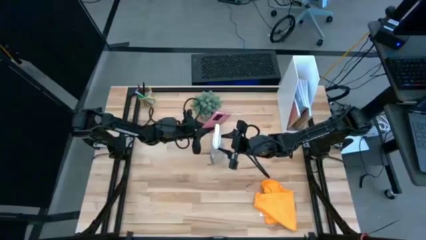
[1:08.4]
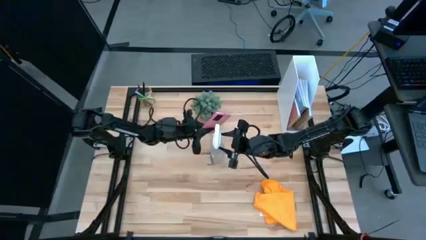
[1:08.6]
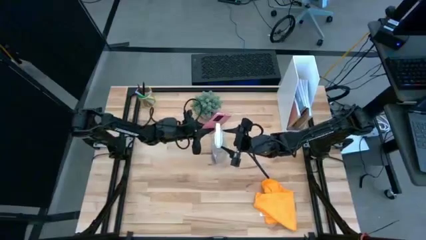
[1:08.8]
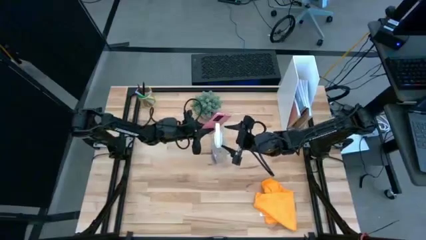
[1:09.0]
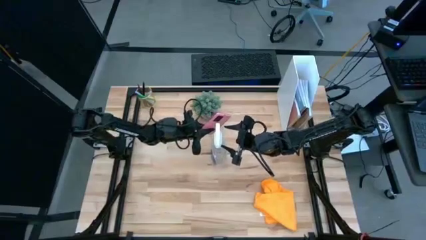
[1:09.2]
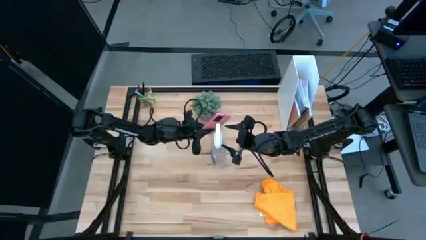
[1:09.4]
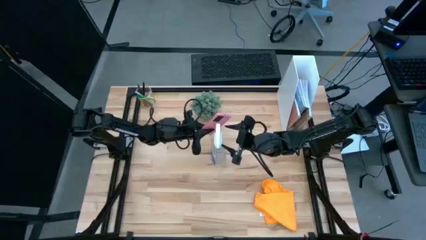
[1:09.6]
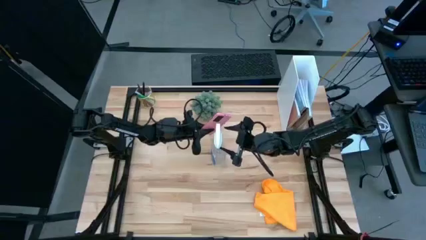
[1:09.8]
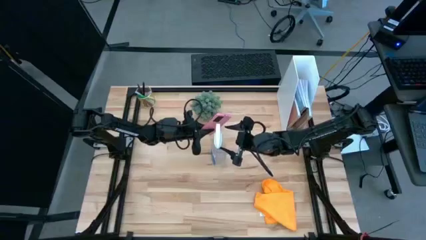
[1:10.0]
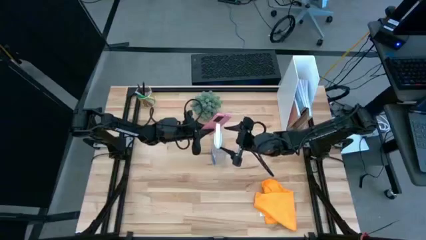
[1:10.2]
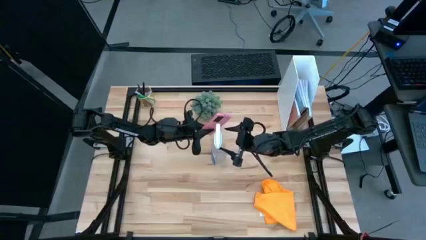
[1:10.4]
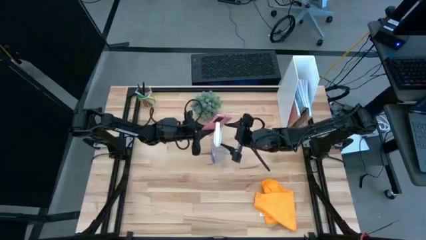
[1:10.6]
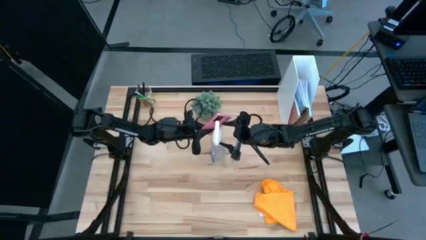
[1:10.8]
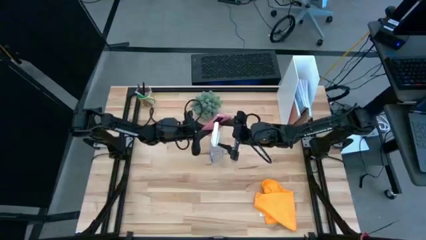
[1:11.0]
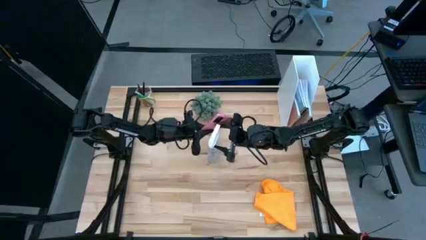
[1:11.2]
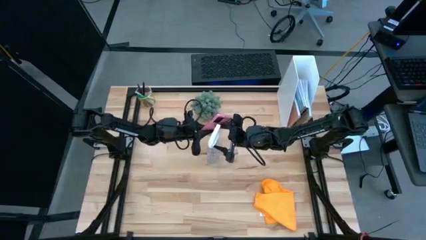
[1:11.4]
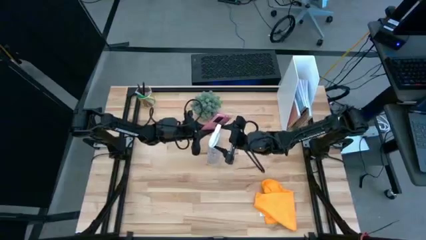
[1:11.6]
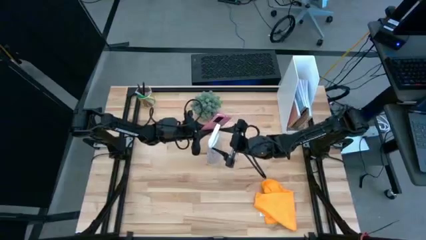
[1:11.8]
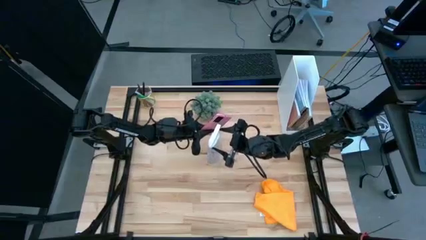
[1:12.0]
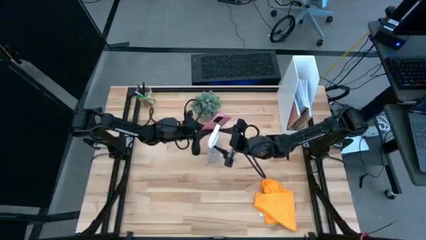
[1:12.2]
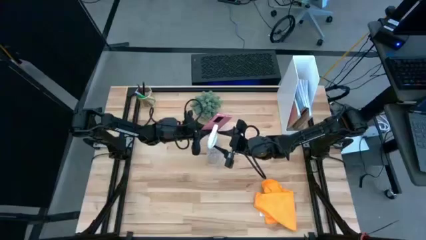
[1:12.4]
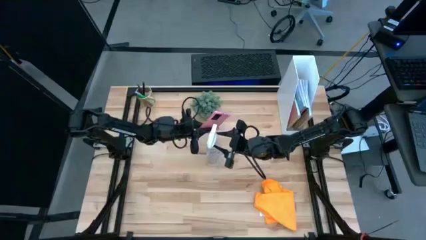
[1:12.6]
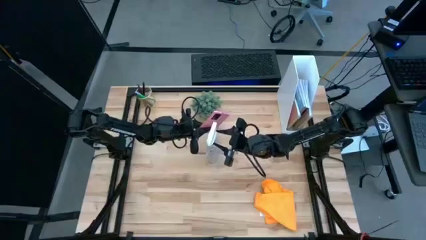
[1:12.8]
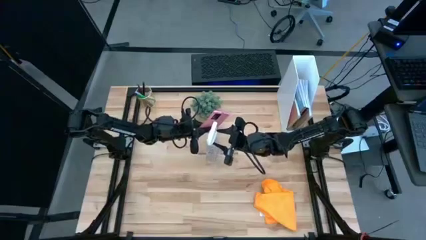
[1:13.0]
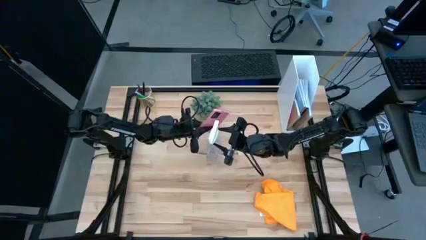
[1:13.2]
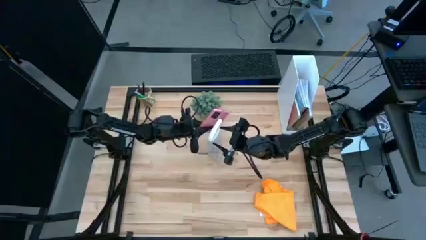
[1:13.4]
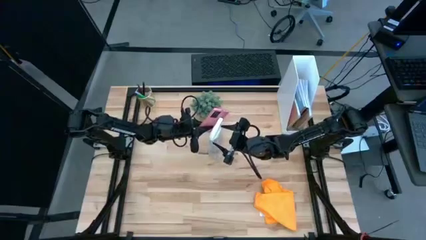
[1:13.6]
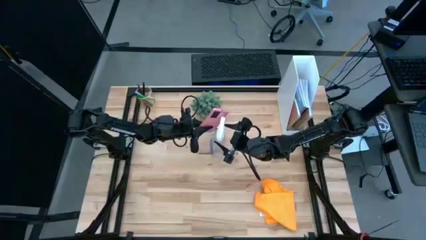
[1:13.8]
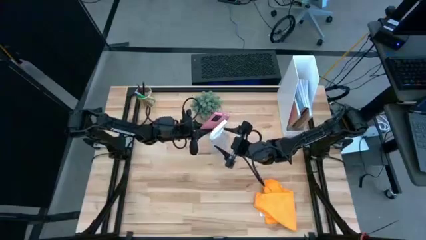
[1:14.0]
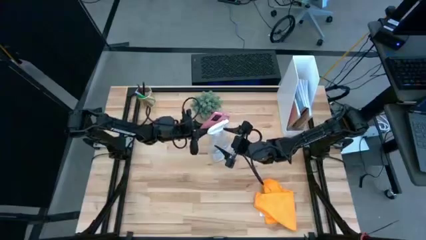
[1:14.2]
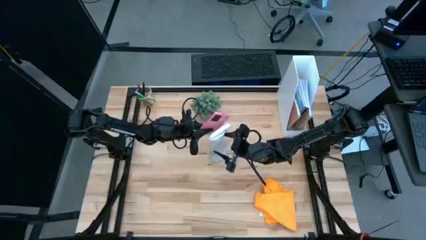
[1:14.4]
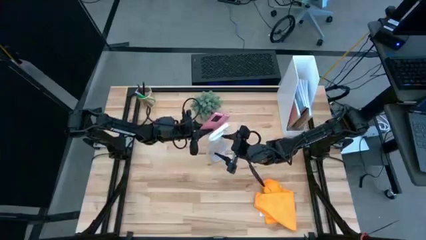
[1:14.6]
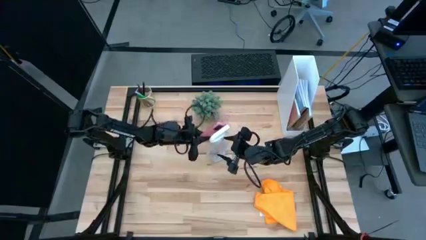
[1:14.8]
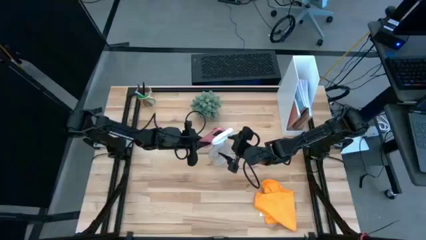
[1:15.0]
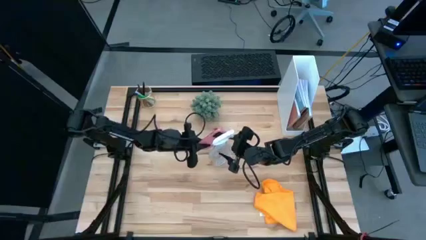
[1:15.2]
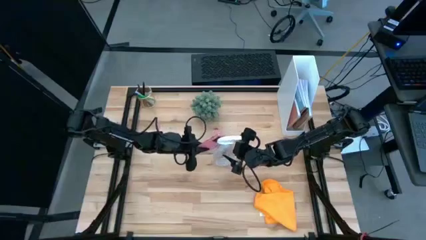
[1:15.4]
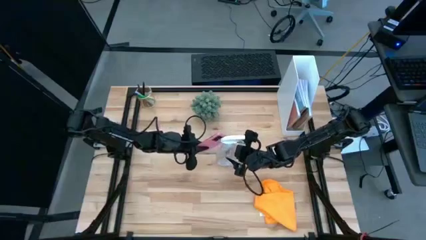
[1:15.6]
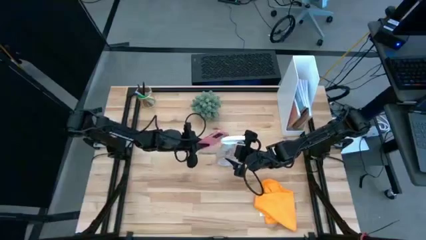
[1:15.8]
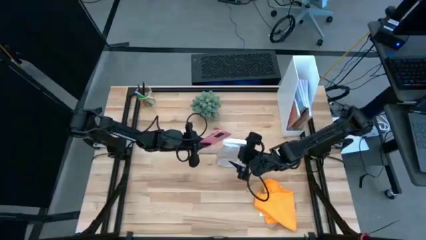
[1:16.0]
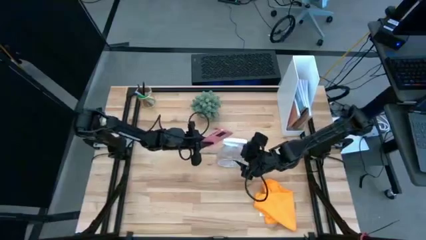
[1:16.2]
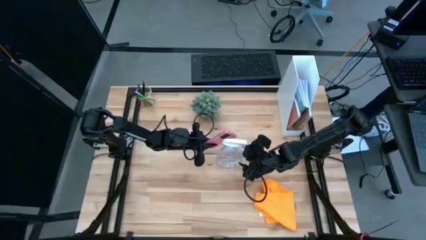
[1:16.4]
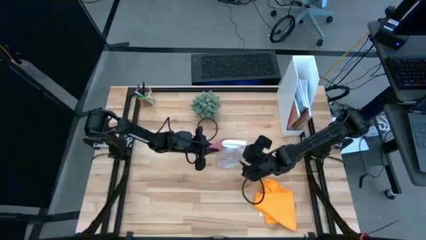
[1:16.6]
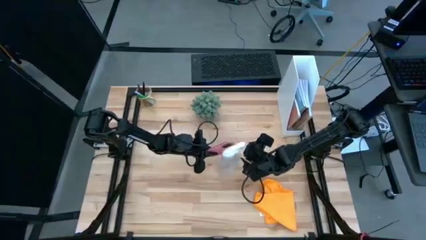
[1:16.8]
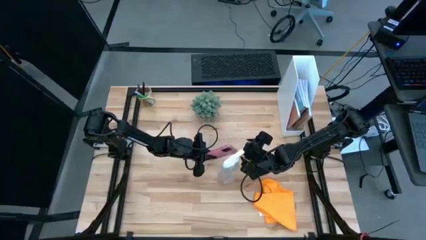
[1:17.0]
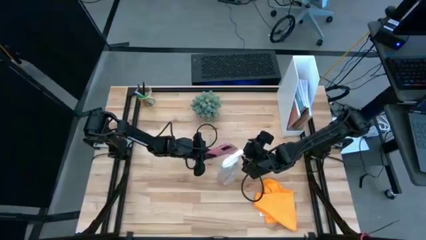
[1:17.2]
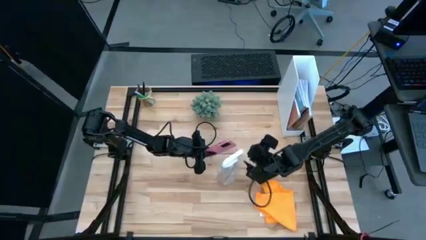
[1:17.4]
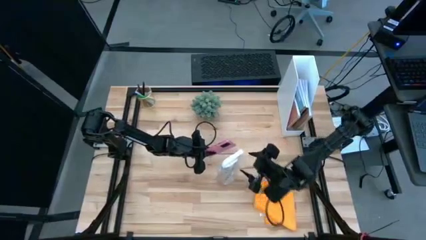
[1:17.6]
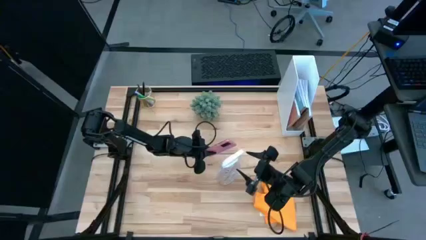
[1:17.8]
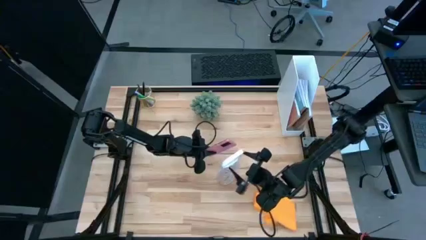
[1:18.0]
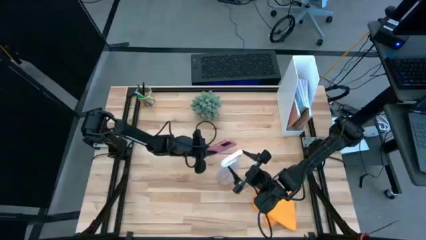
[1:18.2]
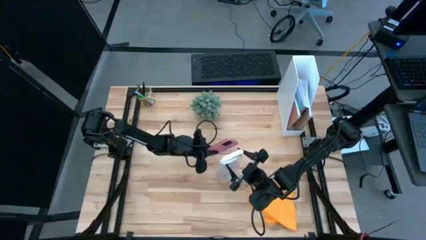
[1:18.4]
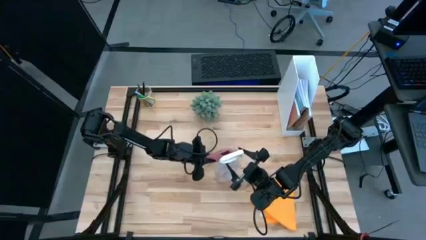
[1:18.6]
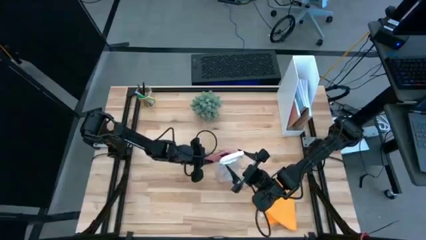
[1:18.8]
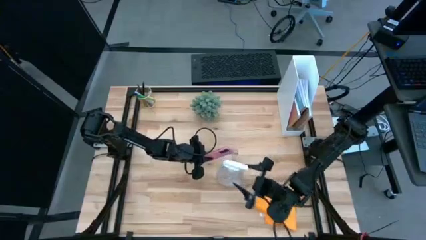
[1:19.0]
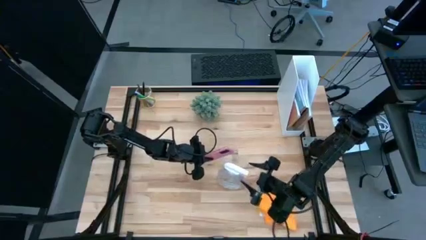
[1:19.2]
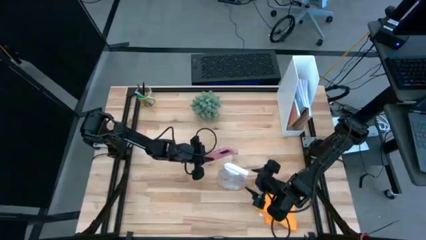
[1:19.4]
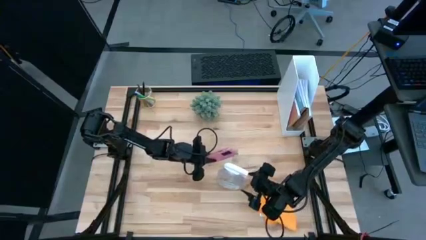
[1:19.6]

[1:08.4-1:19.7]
Task: Apply microfiber cloth
Spray the back of the cellphone using the spray bottle
